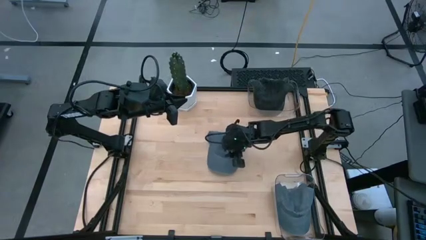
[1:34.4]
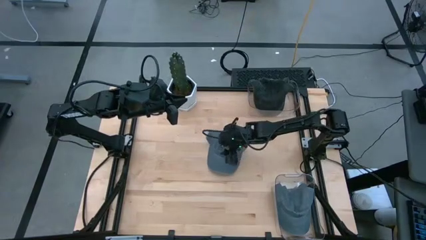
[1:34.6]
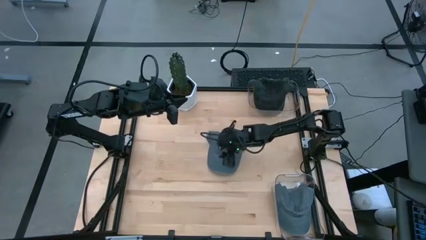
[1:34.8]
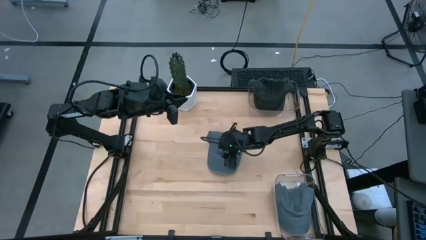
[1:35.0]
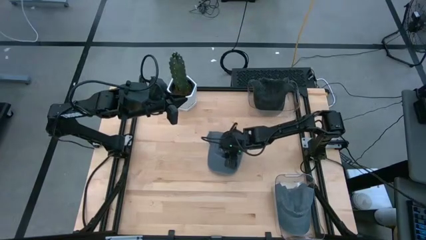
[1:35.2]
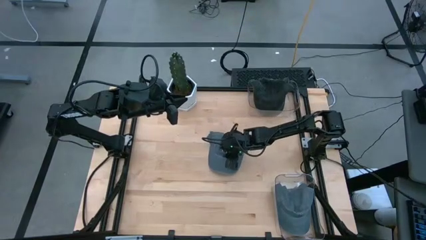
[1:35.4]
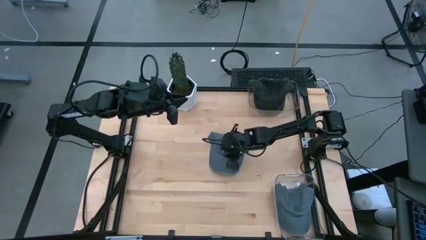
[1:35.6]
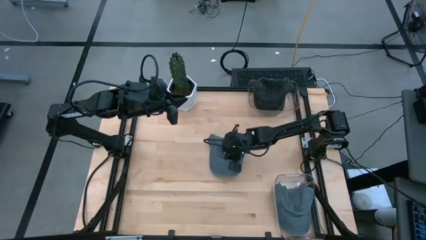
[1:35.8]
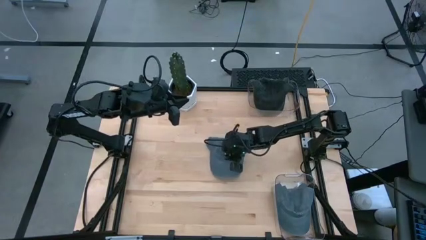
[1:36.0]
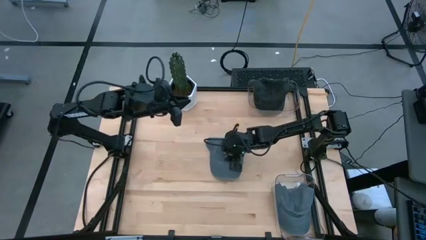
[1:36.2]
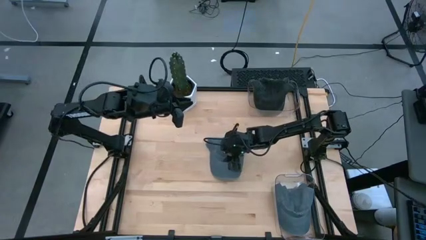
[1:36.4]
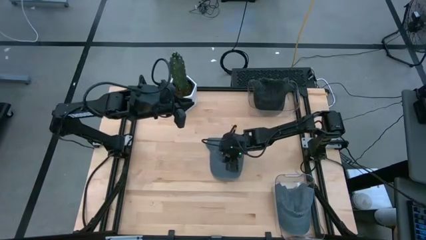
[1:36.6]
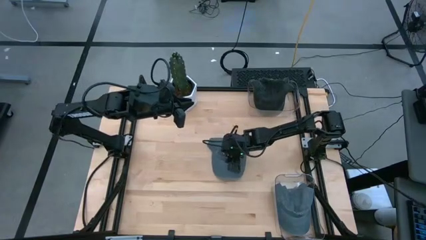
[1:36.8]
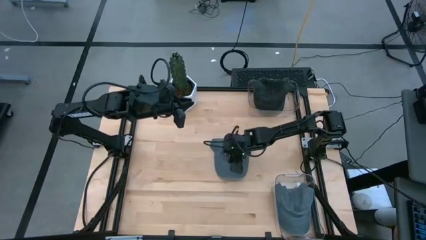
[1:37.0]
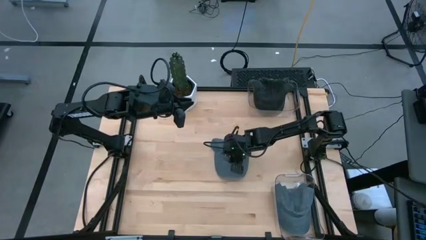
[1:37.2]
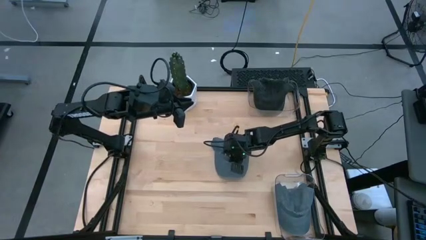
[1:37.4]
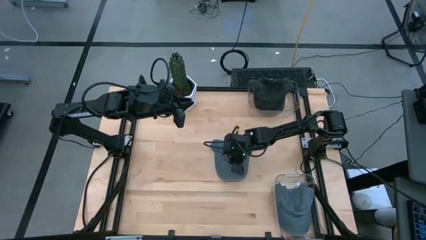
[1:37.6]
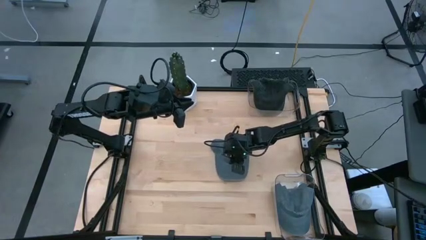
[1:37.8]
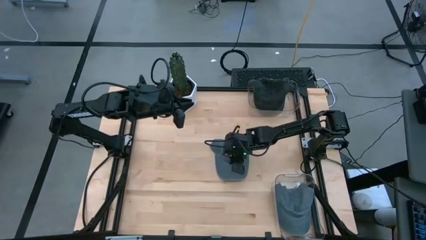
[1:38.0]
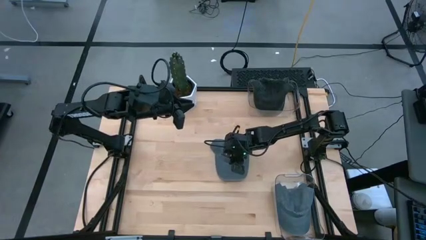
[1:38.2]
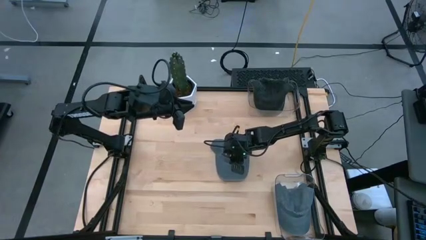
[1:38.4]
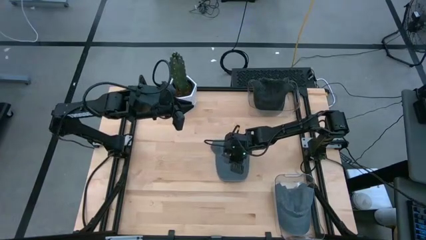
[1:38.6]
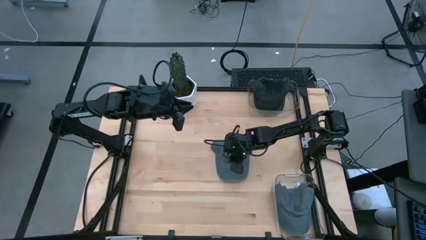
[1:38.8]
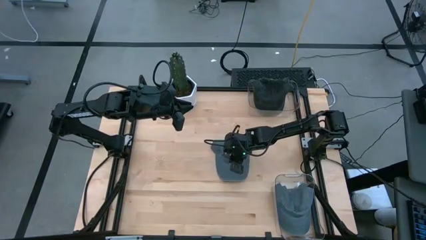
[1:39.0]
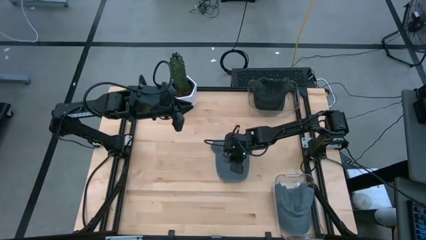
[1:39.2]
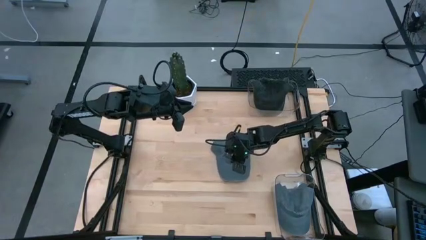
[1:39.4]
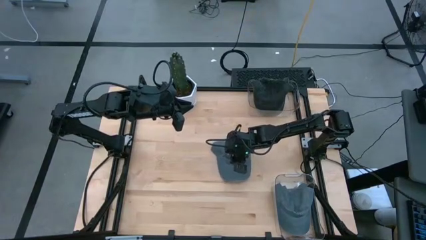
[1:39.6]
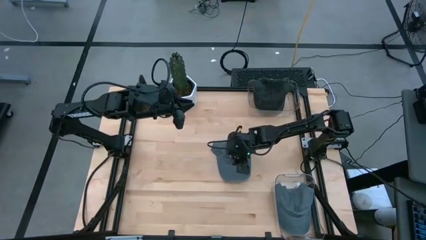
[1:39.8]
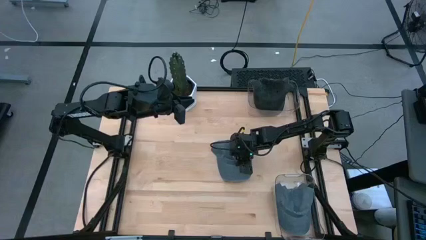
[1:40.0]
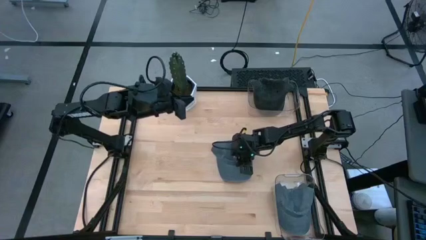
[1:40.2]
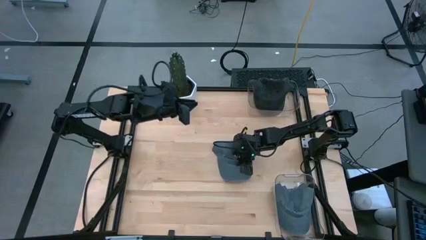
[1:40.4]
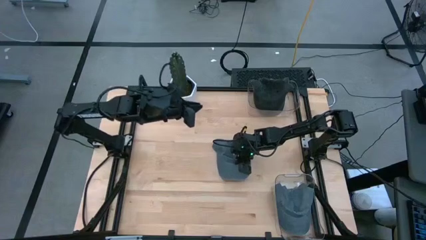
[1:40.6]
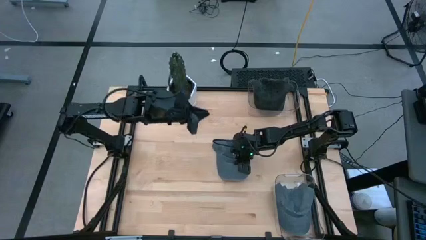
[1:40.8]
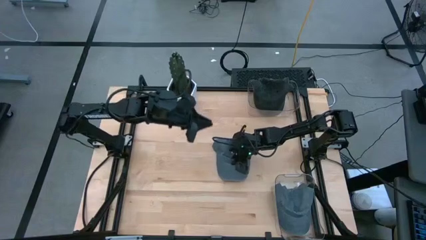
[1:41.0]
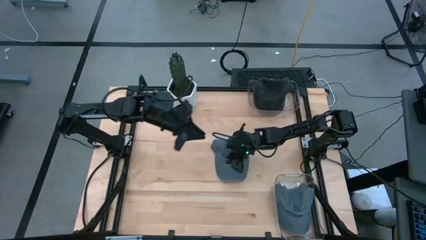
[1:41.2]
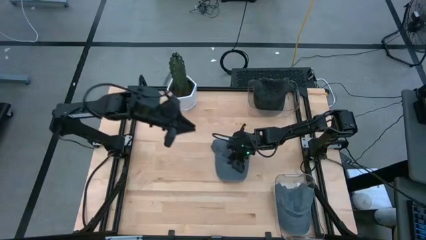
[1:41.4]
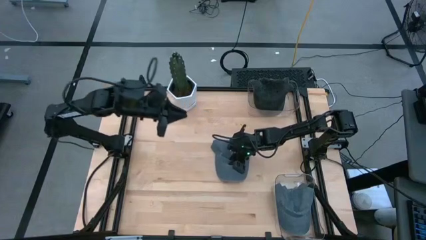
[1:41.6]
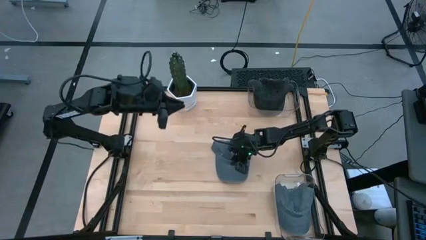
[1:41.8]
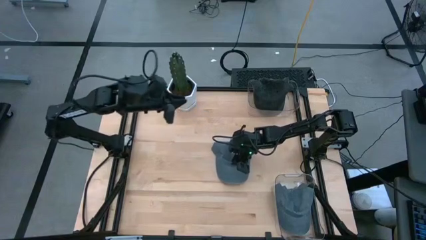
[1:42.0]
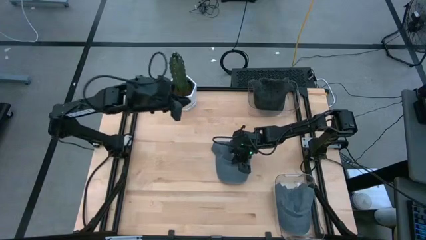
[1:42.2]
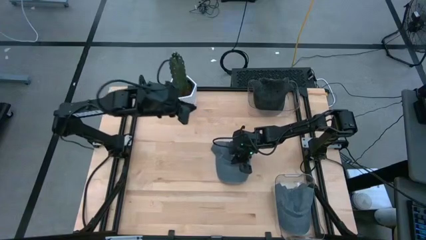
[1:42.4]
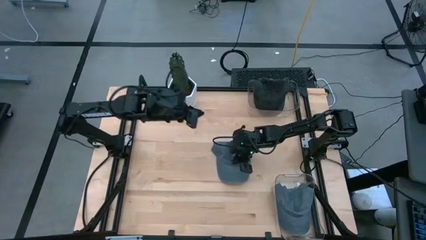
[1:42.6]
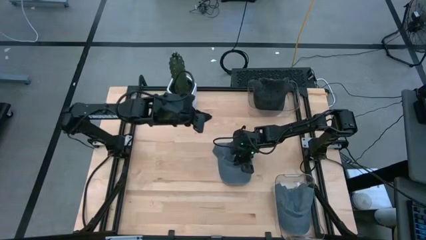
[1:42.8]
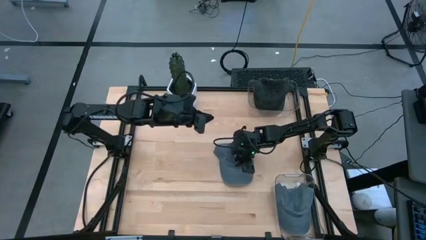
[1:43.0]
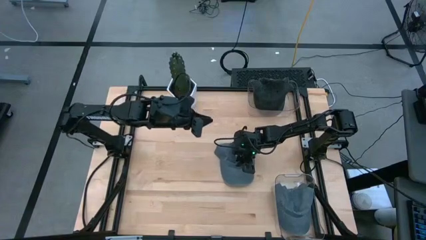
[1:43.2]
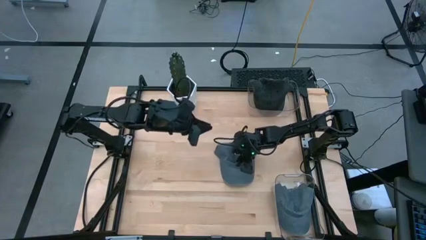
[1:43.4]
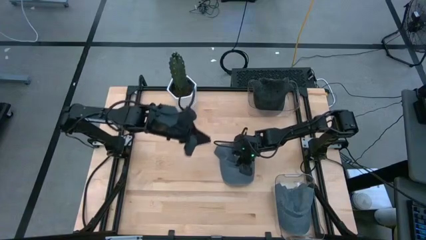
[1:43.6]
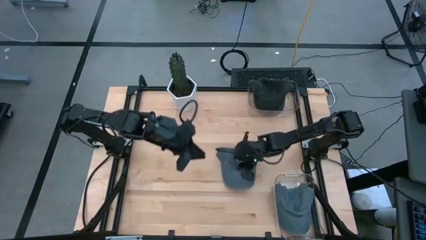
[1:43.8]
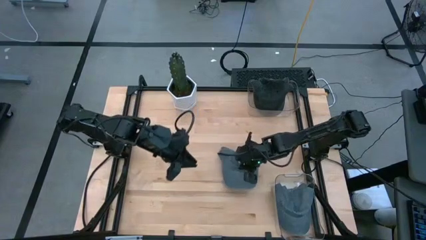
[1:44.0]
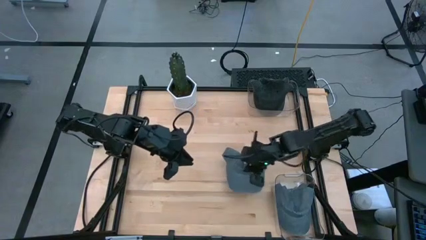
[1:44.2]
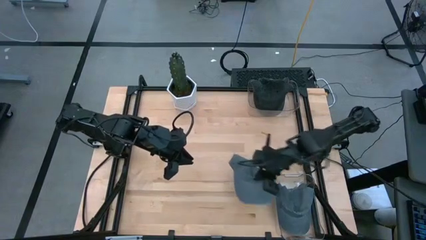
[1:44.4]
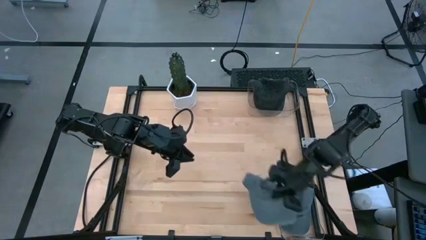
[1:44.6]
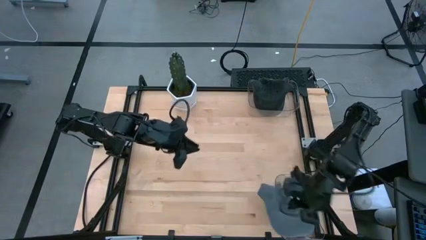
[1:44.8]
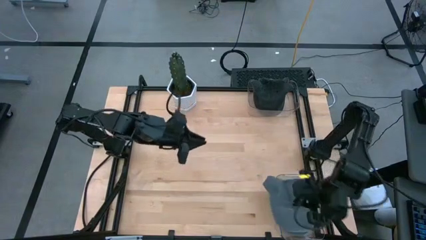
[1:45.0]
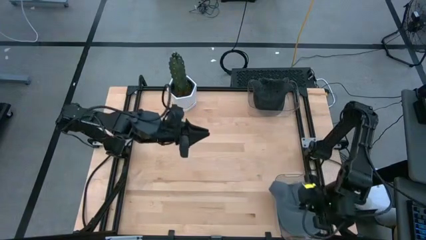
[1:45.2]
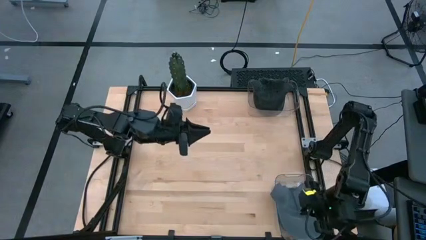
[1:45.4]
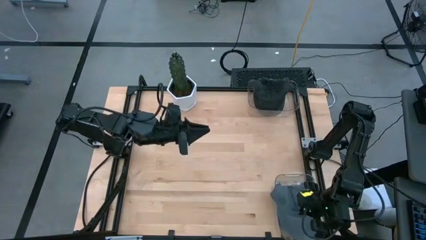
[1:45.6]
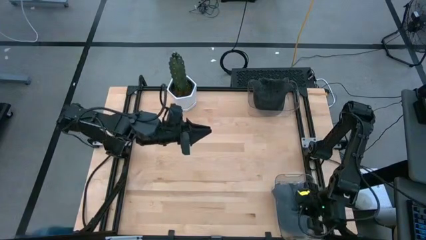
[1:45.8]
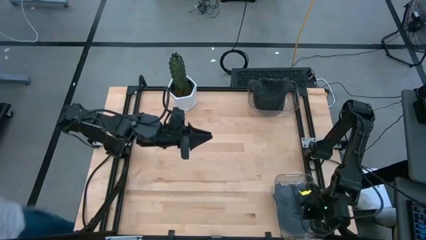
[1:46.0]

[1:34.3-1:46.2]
Task: Pick & Place hat
Put the gray cap into the bottom transparent bin

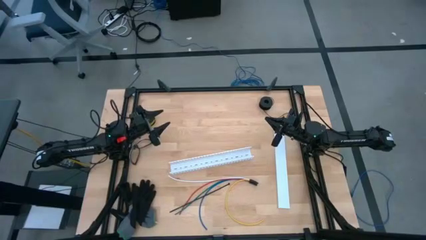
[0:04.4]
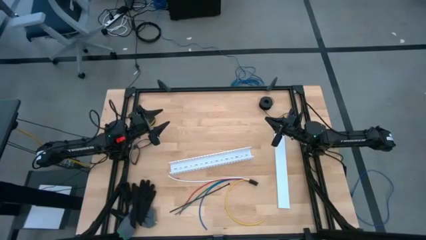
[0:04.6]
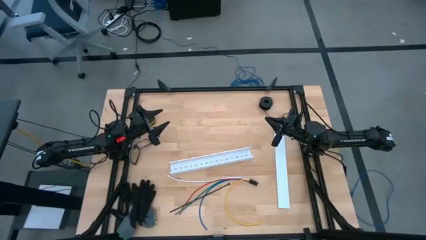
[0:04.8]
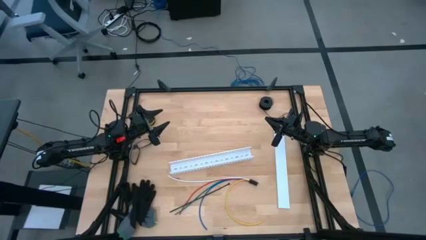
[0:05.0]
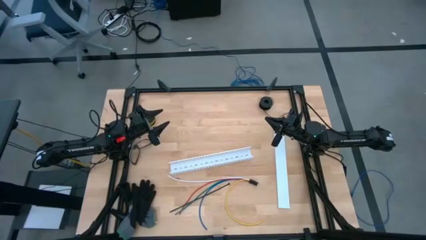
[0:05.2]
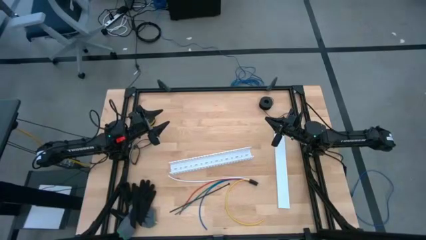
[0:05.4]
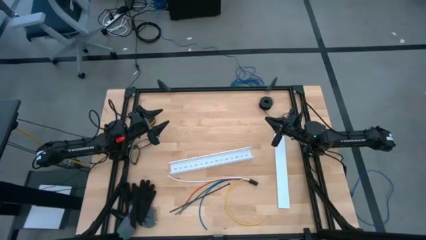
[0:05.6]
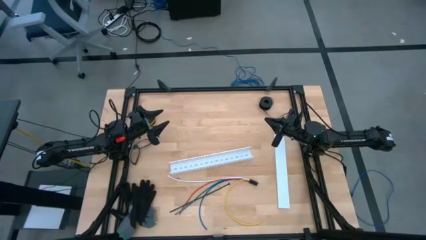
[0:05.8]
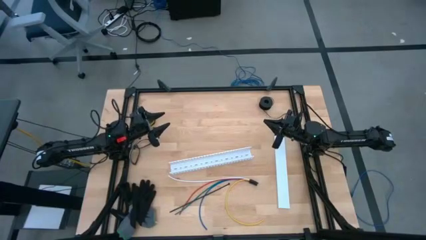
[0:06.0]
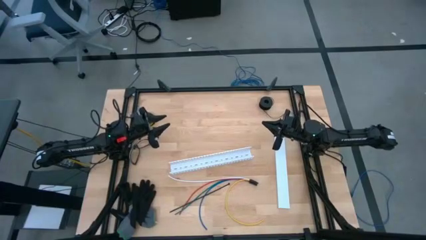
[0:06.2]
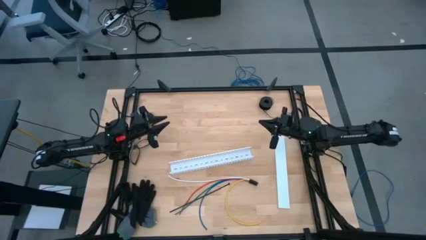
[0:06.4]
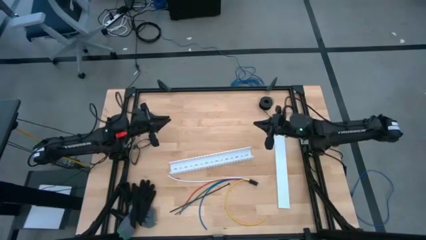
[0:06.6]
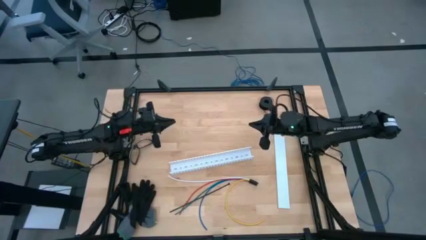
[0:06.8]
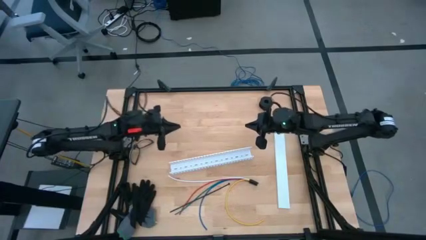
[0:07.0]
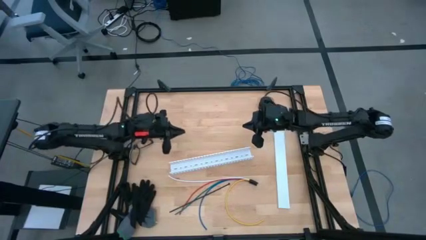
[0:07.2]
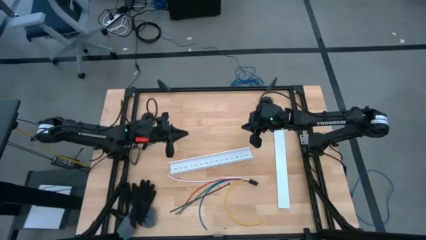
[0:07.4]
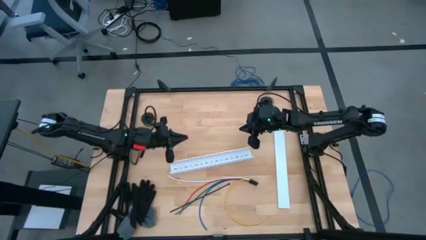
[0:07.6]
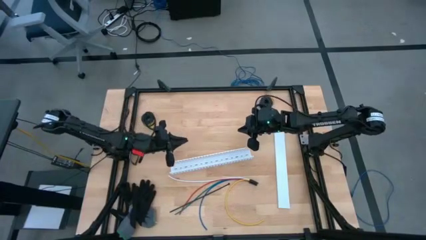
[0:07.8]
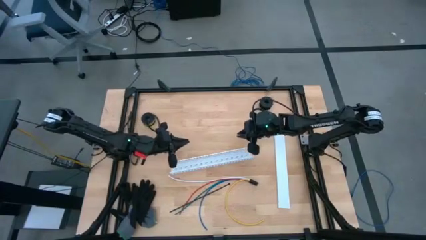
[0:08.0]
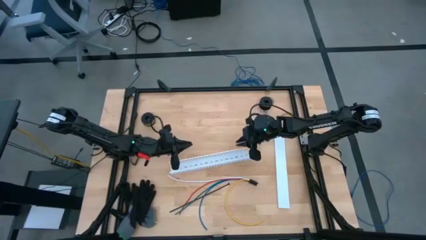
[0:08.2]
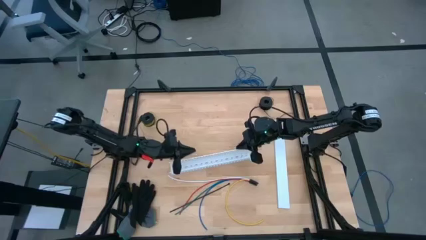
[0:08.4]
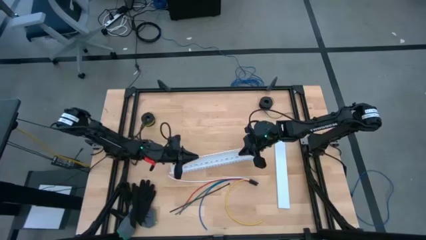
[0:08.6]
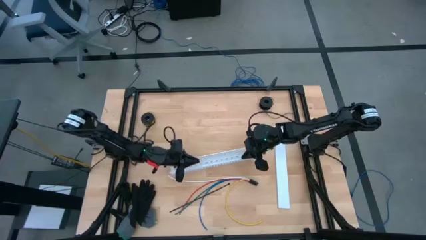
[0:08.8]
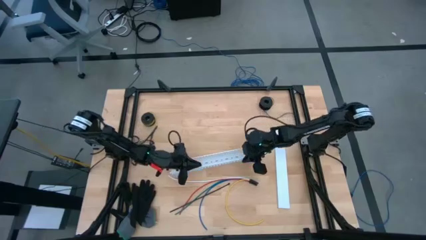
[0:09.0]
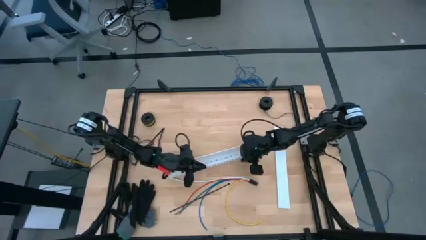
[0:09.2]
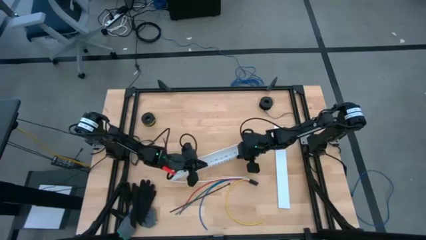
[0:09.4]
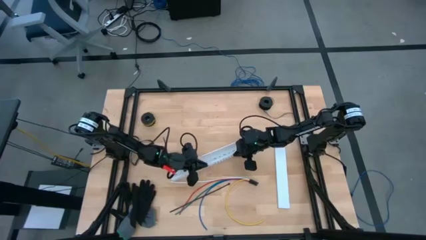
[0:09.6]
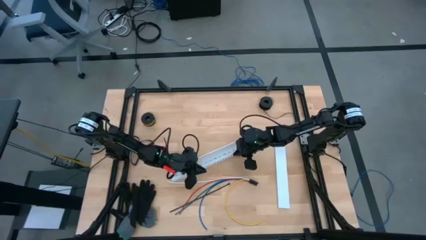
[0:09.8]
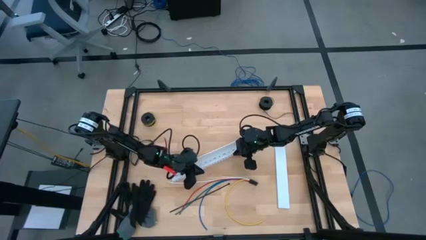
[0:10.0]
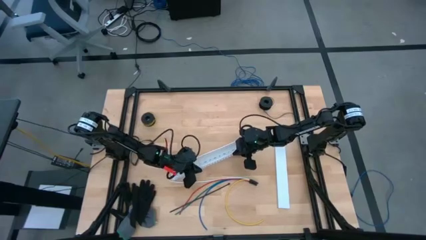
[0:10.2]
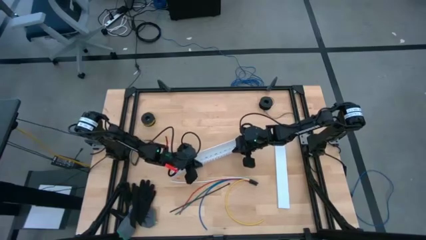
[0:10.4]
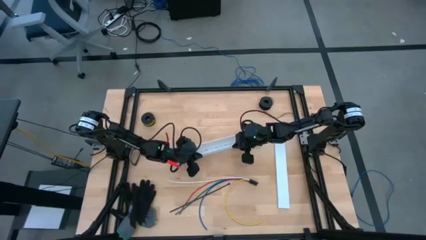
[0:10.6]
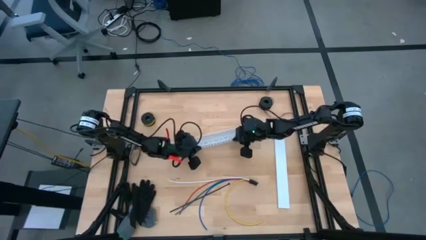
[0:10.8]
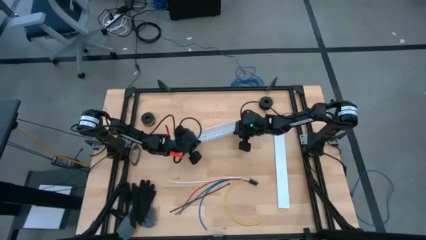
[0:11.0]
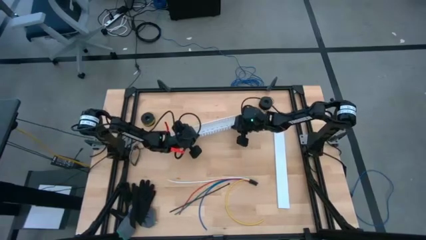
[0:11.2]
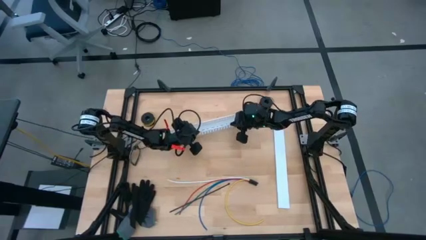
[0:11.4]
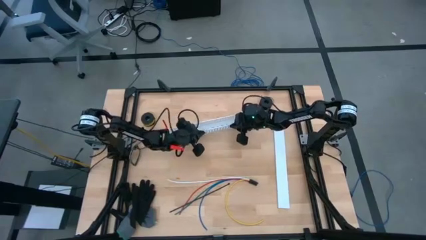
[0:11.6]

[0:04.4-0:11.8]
Task: Ziptie cables
Adjust the white cable duct
